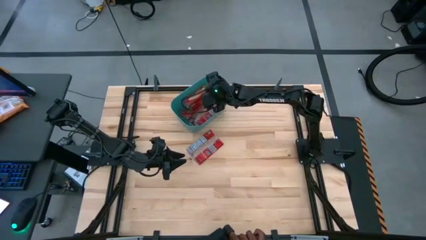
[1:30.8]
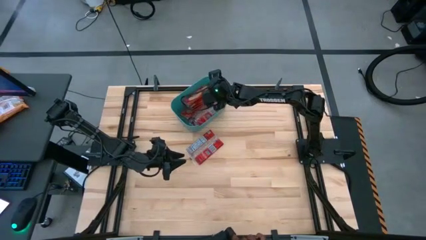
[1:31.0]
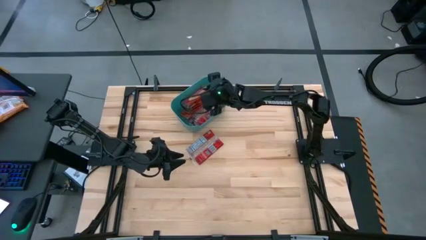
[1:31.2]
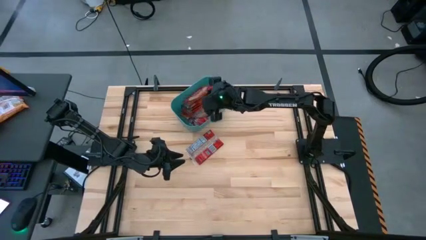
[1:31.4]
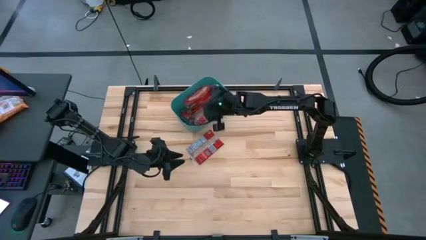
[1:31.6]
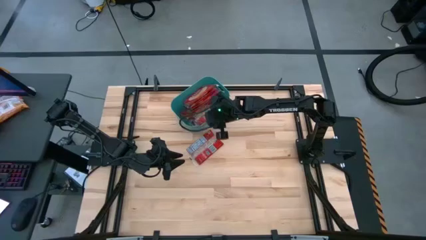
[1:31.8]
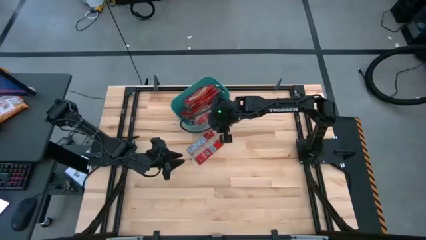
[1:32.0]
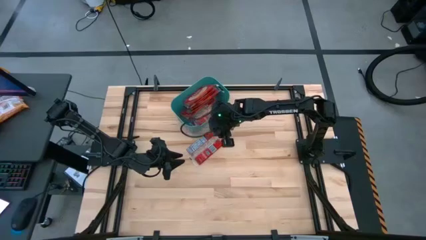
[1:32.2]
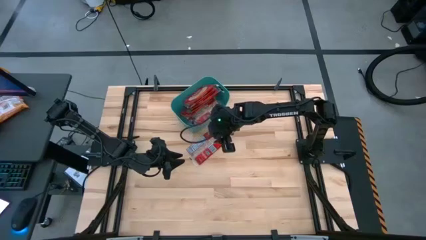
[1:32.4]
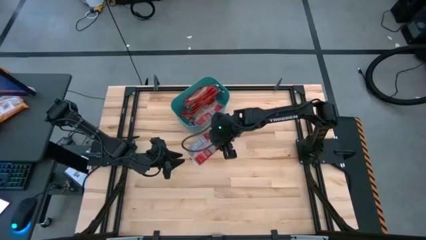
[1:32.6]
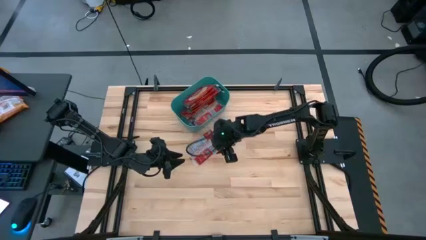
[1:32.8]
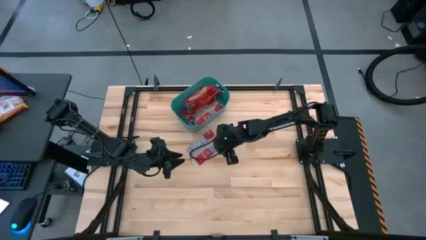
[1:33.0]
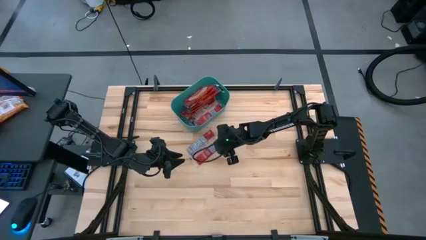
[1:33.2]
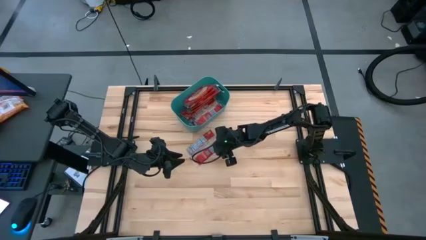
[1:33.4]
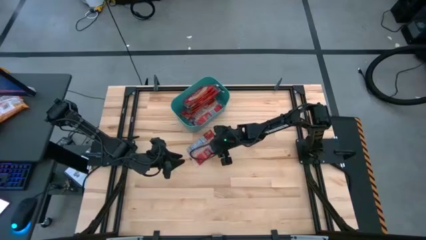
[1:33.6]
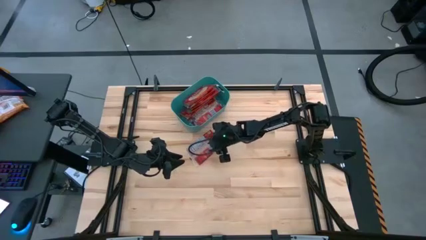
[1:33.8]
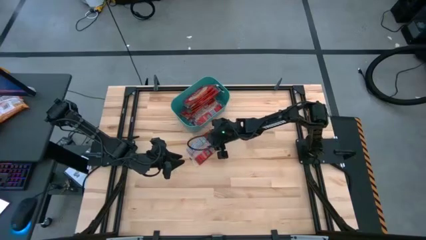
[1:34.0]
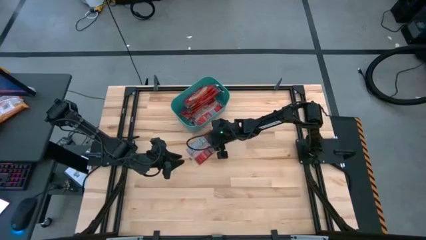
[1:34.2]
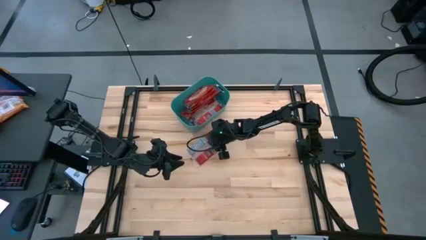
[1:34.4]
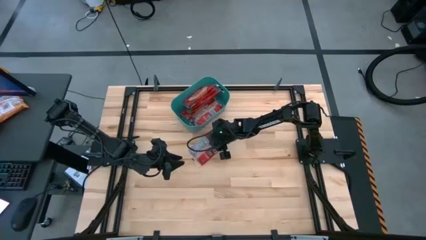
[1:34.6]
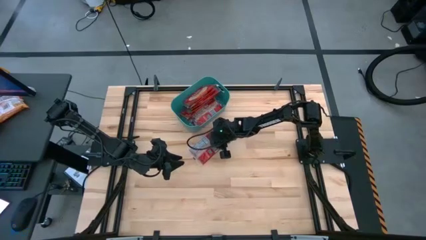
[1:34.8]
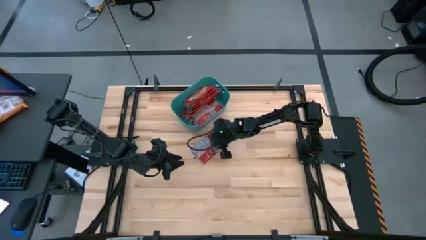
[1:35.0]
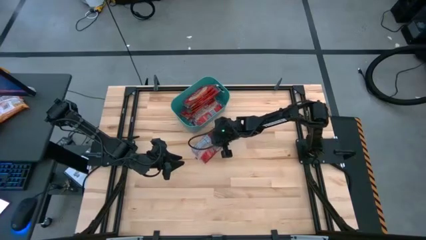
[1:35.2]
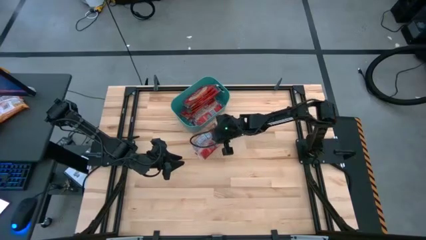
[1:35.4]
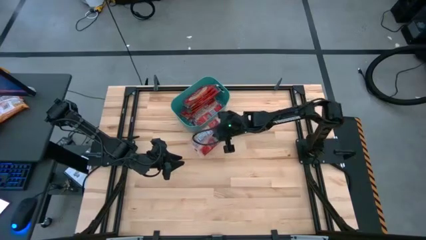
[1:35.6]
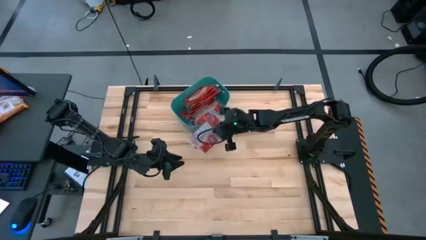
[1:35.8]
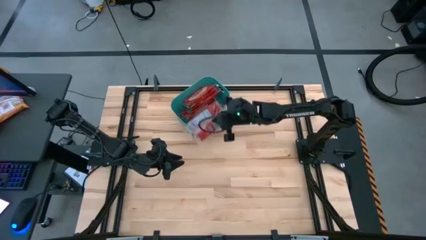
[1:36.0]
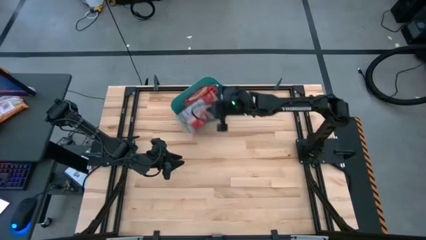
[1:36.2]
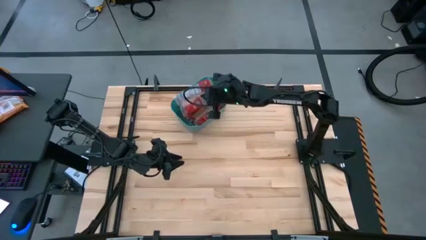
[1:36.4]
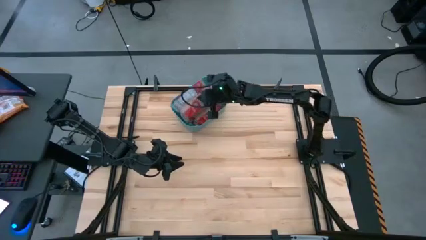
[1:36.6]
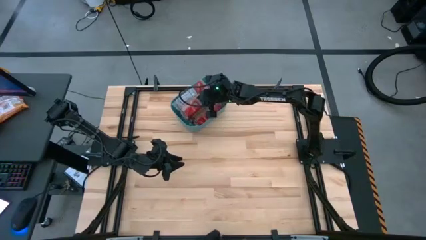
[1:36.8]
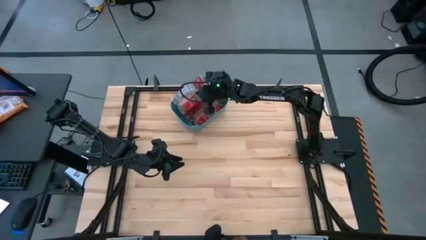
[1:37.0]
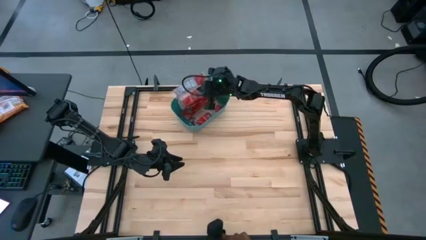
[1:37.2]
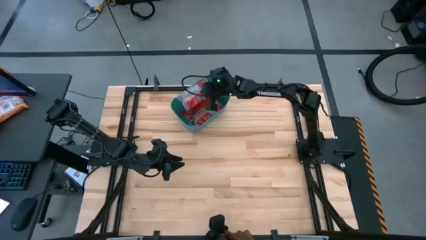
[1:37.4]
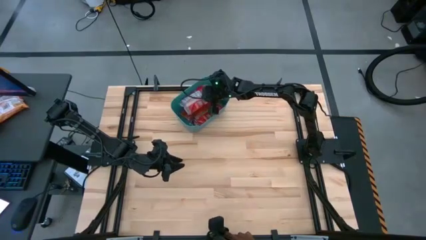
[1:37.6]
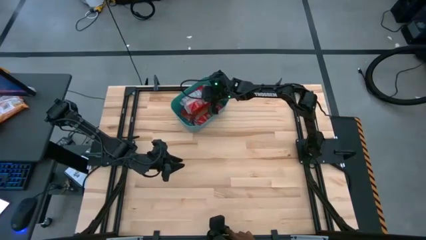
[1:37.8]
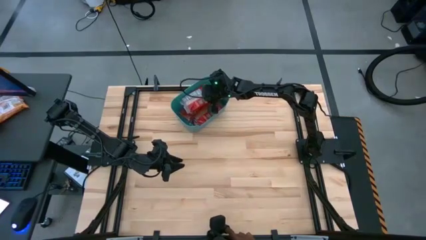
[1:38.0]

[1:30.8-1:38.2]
Task: Sort popcorn bags into baskets
Put the red popcorn bag into the blue bin

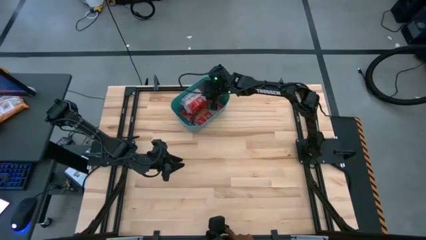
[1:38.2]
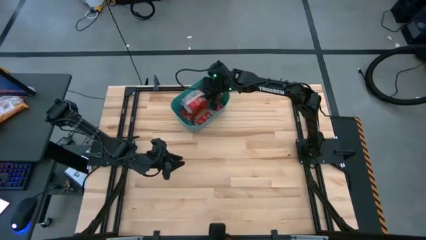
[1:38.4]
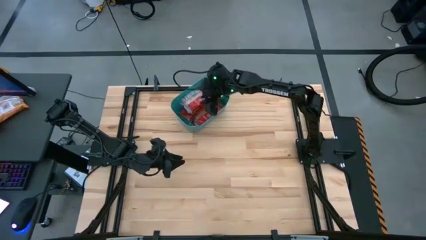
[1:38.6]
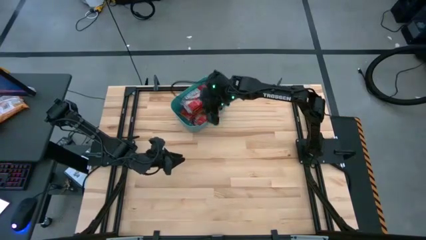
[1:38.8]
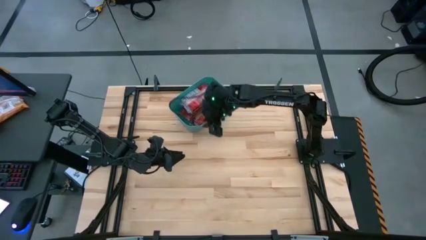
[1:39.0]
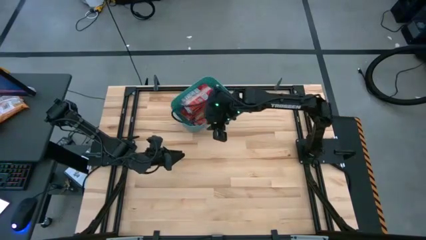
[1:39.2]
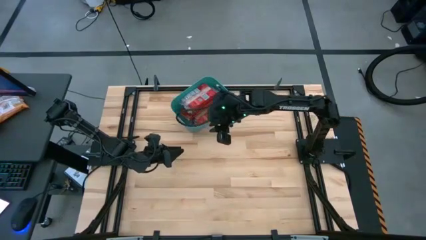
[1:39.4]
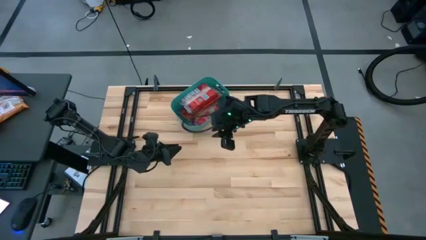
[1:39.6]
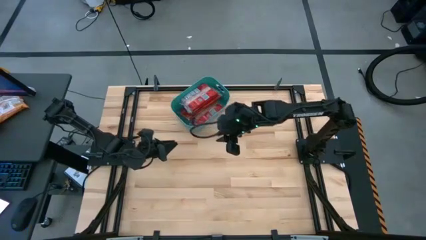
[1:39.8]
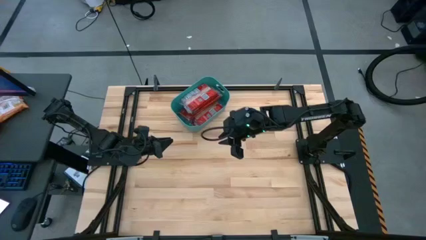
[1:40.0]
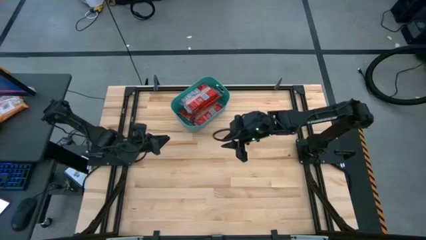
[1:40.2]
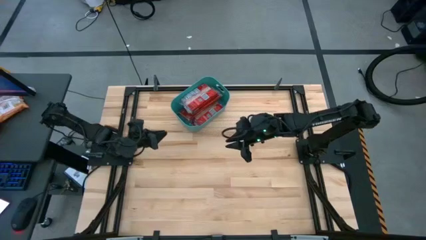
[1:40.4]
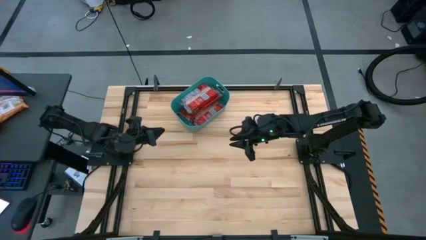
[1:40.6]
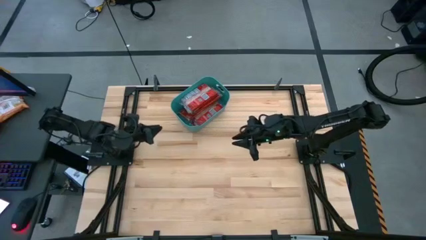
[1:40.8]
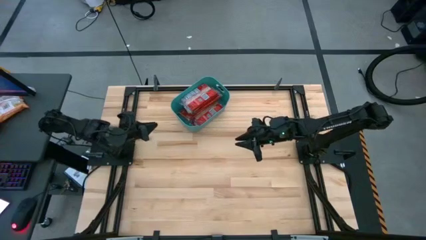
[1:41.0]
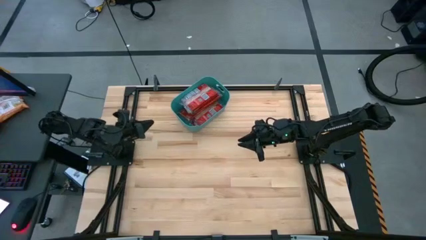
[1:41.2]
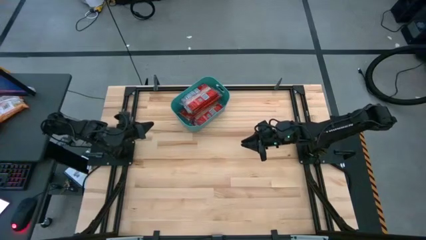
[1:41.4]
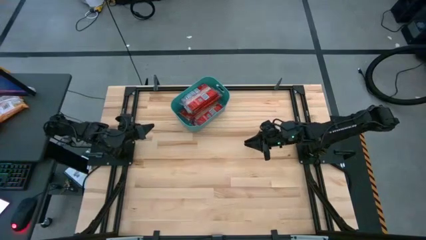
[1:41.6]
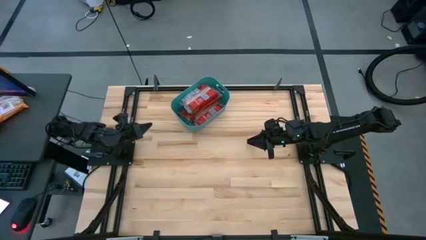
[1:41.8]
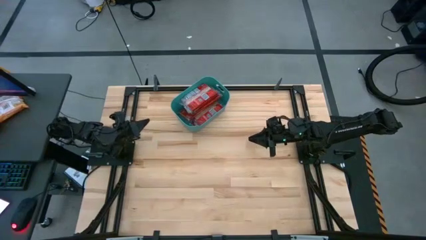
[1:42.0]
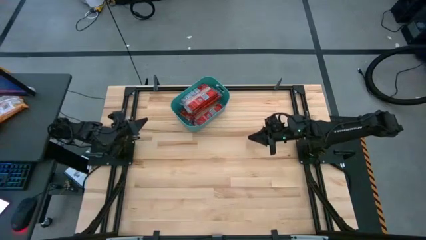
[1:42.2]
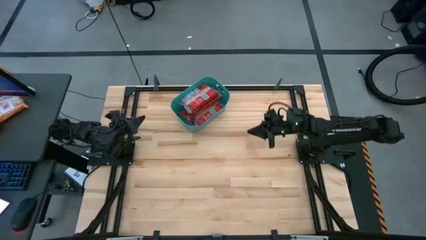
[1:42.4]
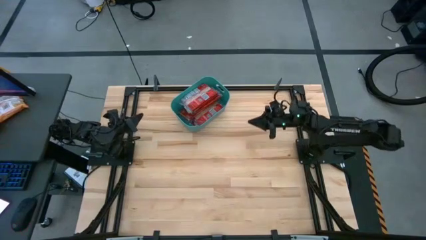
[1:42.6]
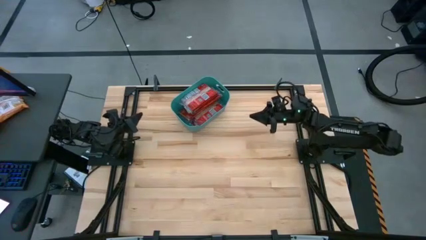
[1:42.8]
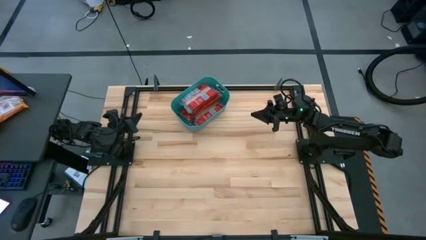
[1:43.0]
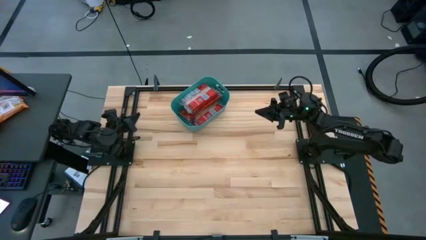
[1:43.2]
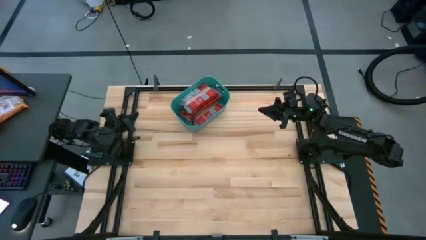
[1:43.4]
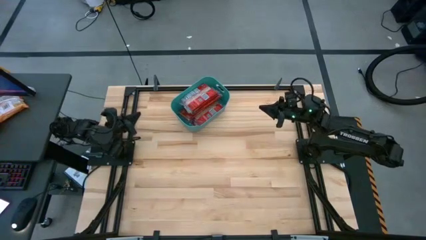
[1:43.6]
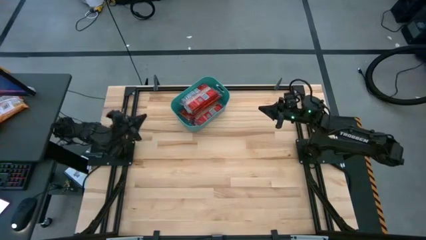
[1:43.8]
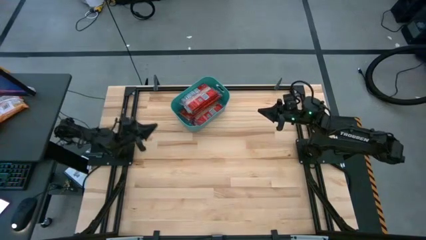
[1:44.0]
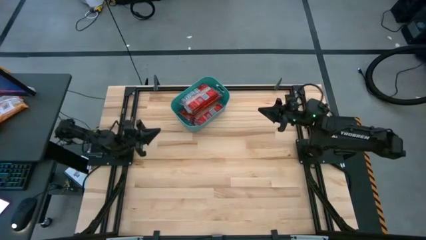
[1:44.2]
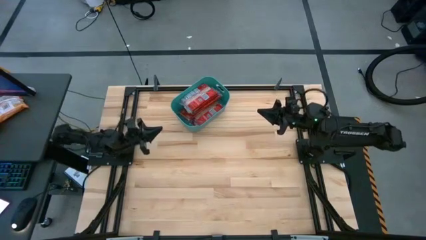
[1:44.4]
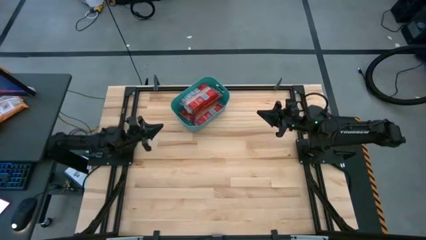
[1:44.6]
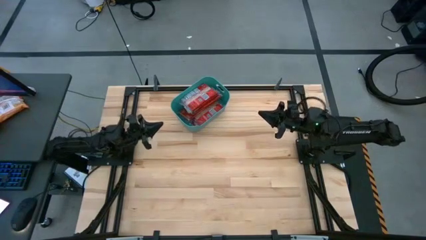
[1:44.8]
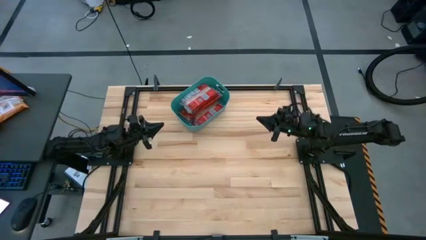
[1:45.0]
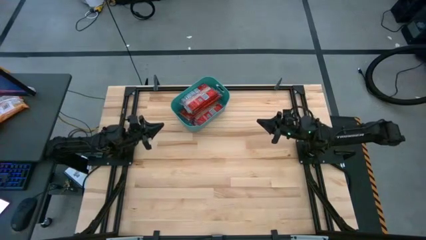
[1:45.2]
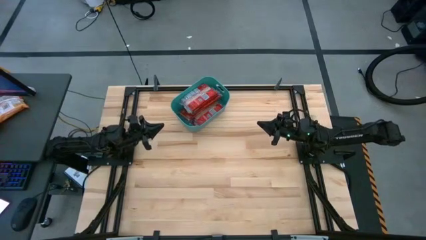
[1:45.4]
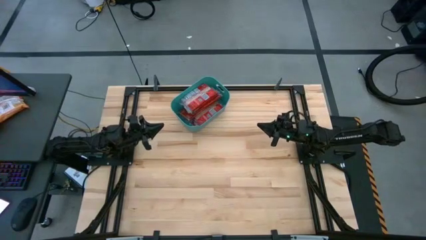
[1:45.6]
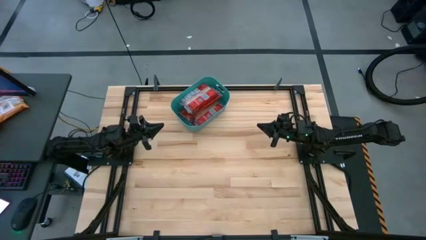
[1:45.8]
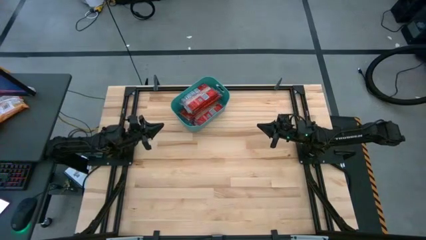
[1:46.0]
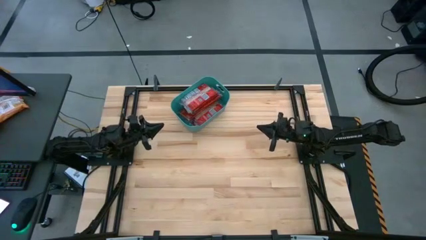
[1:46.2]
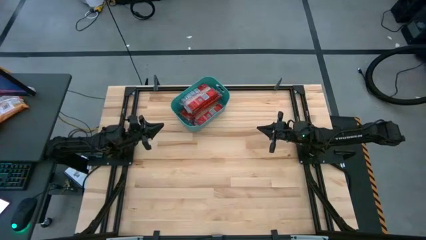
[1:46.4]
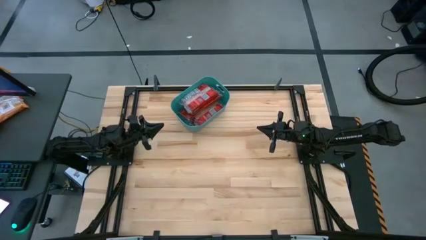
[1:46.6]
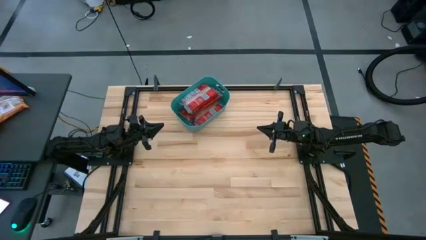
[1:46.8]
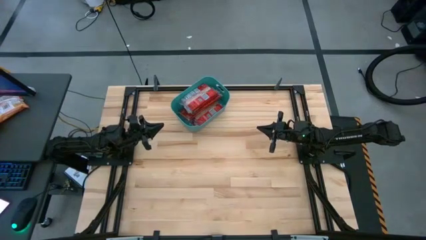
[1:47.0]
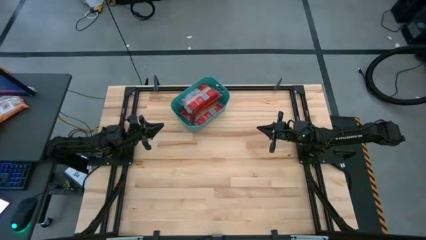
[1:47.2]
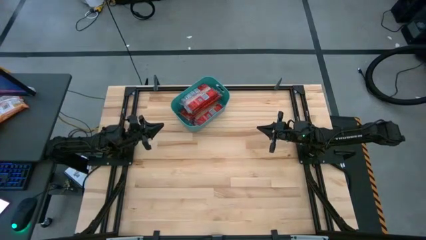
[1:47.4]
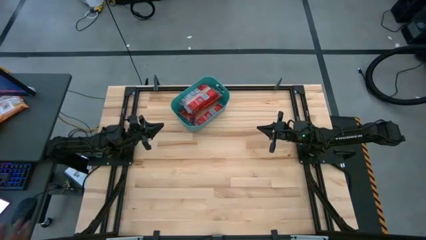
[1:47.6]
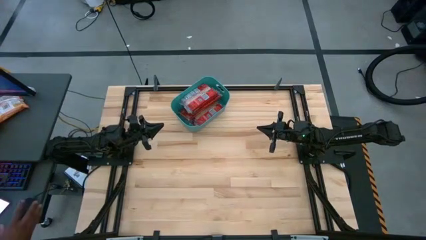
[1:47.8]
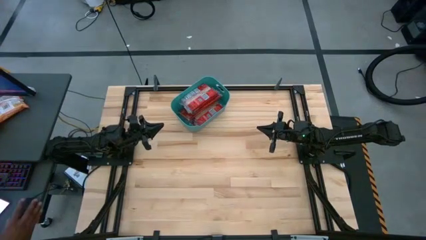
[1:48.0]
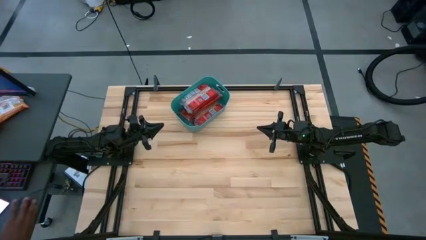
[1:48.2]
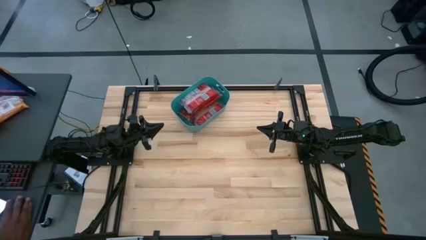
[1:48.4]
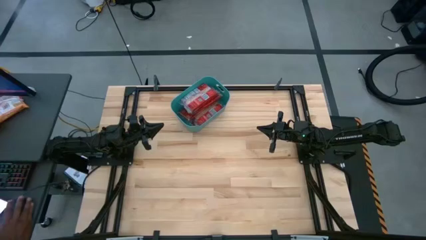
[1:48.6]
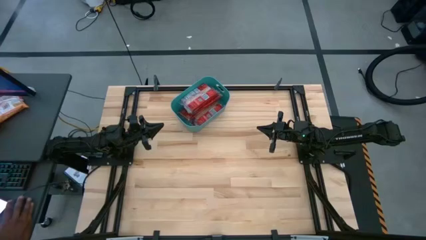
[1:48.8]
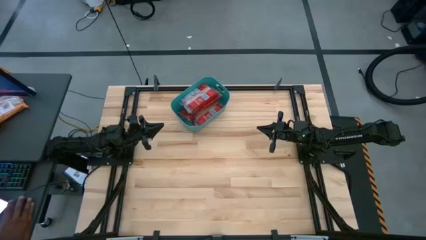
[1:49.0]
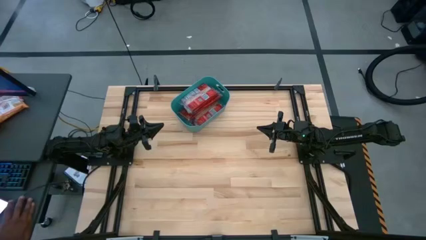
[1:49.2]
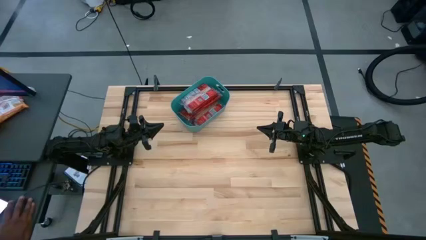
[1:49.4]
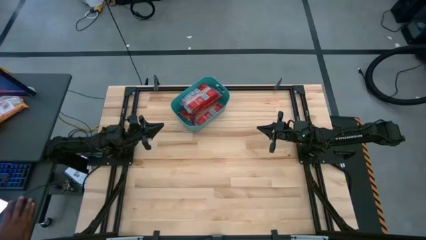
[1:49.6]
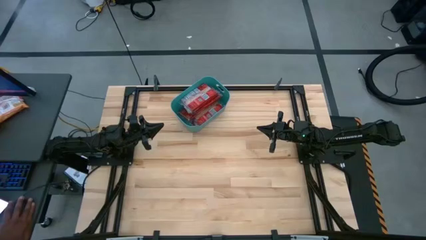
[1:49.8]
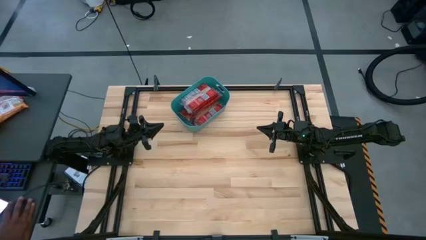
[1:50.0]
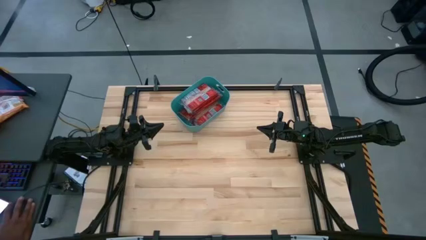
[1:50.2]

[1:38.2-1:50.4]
Return to Home Position
